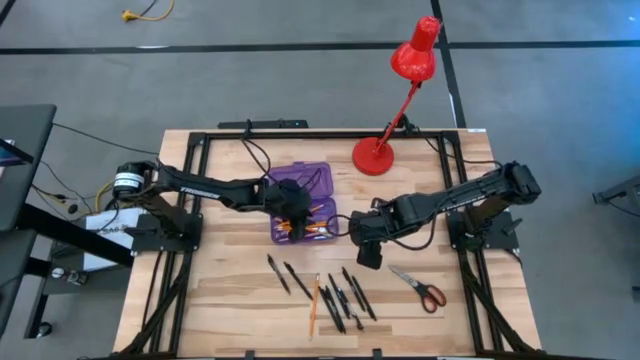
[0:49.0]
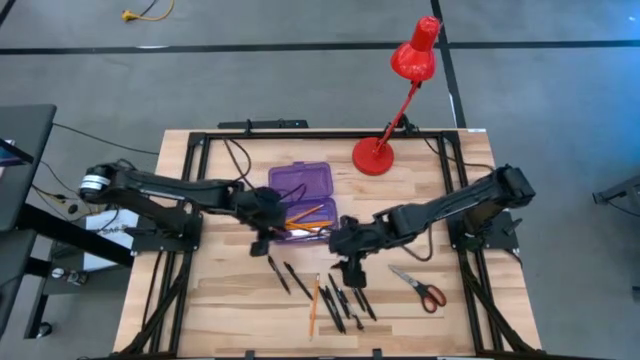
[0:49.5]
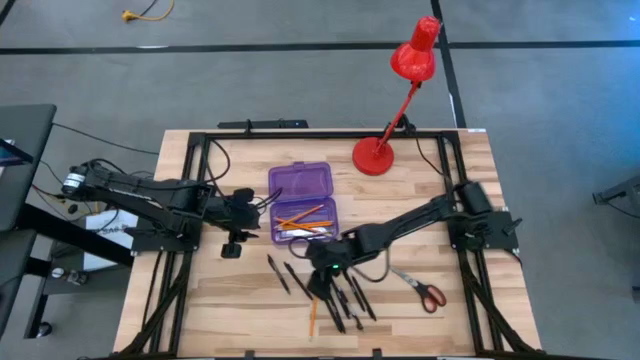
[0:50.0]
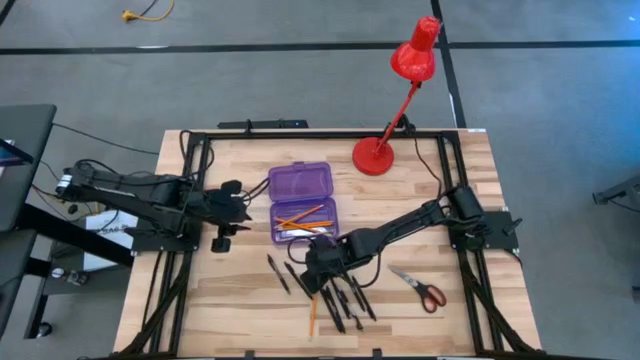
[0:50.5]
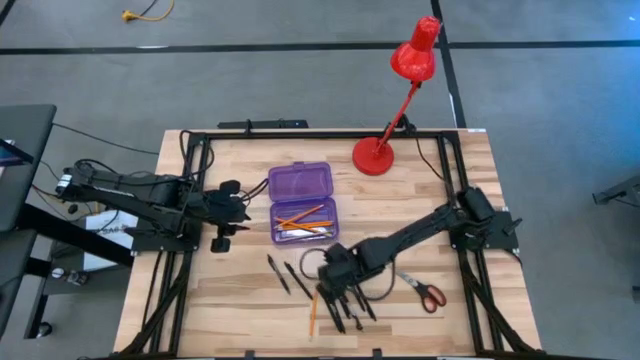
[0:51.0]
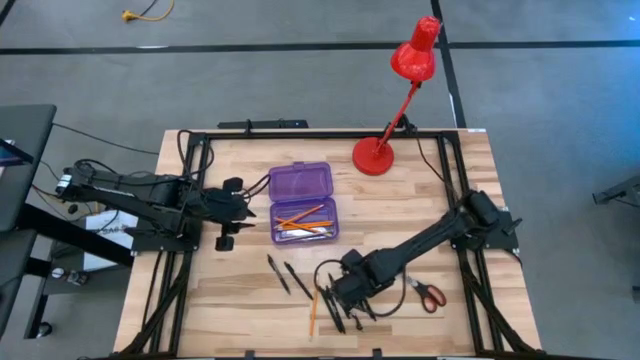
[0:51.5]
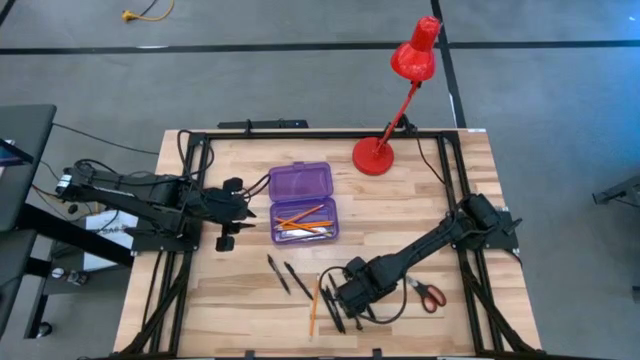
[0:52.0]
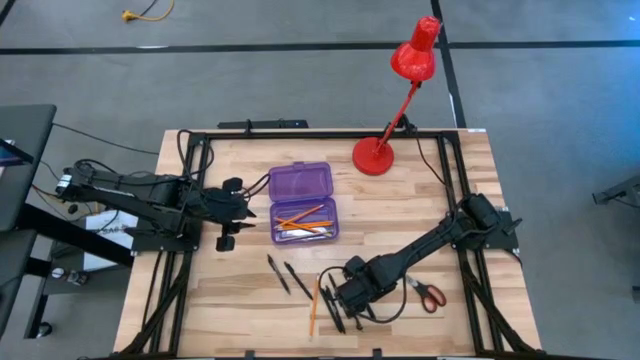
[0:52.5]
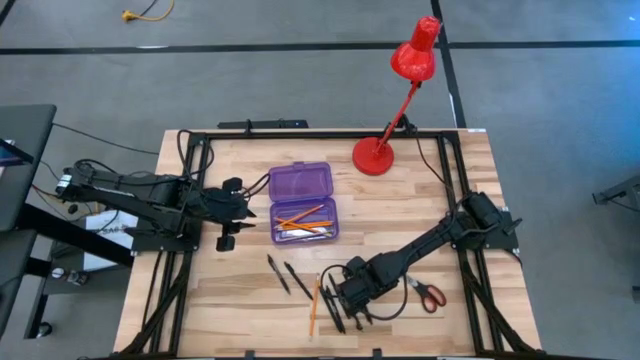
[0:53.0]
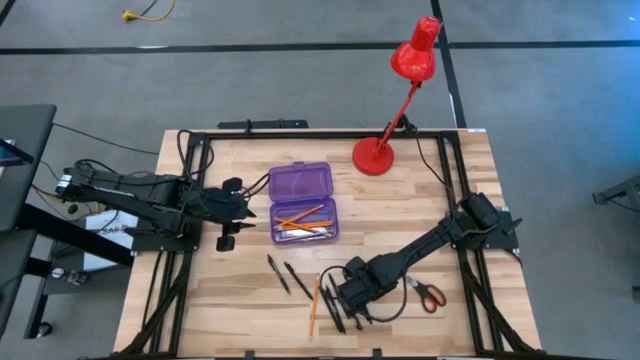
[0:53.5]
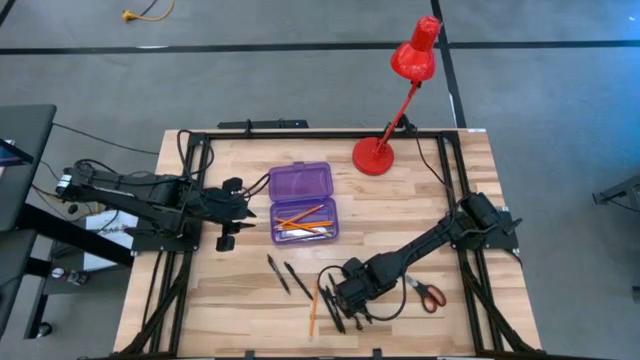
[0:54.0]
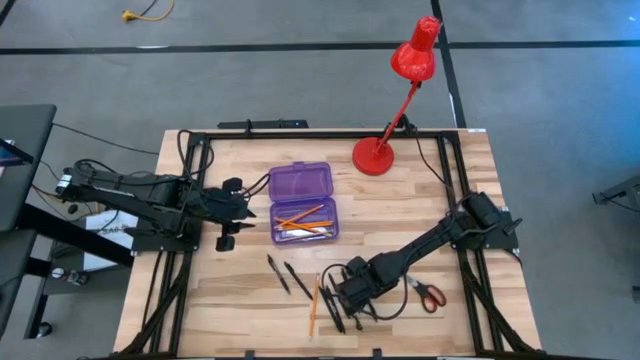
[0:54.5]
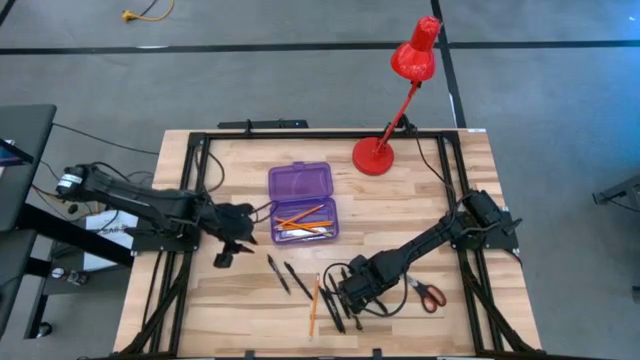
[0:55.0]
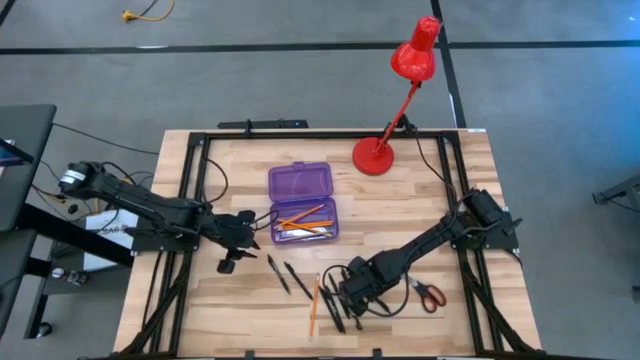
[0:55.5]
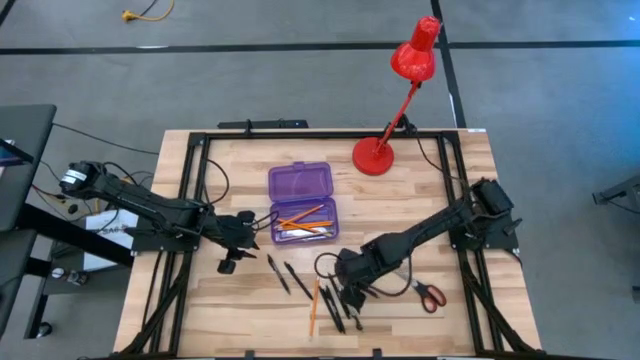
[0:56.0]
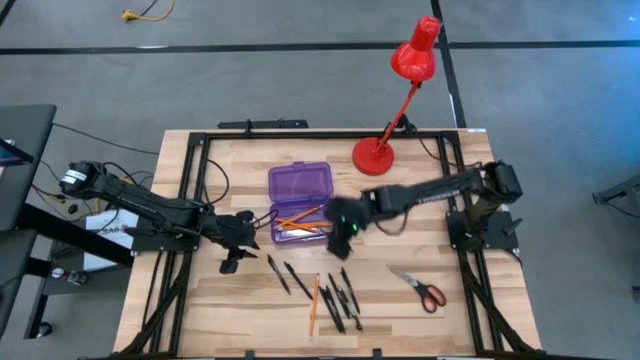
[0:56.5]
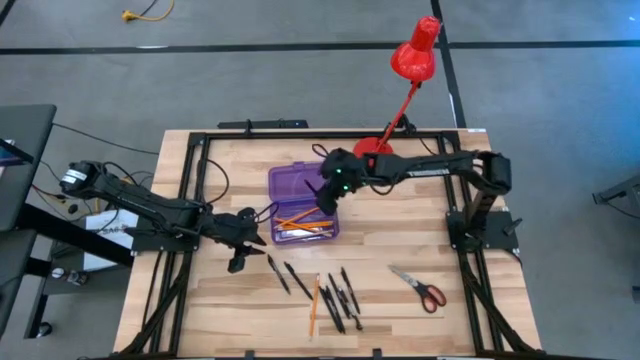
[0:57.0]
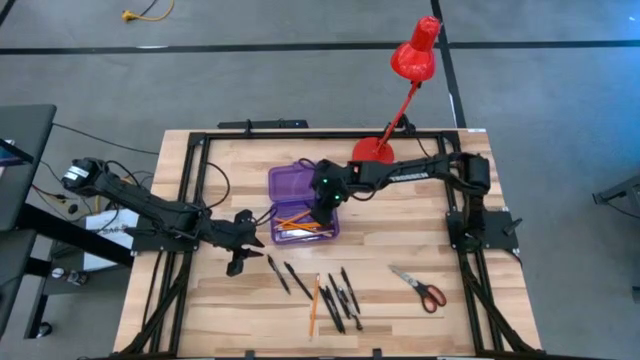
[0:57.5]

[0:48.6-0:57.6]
Task: Pick & place school supplies into a supply box
Put the black pen into the purple supply box

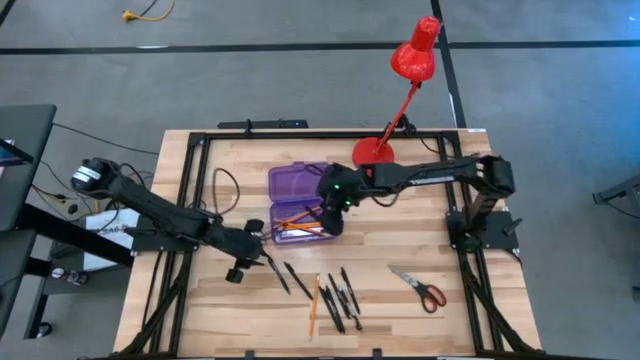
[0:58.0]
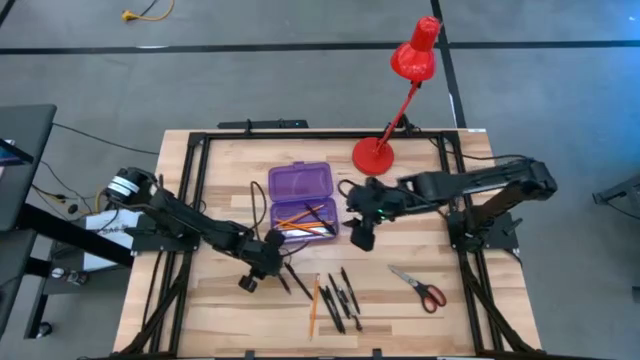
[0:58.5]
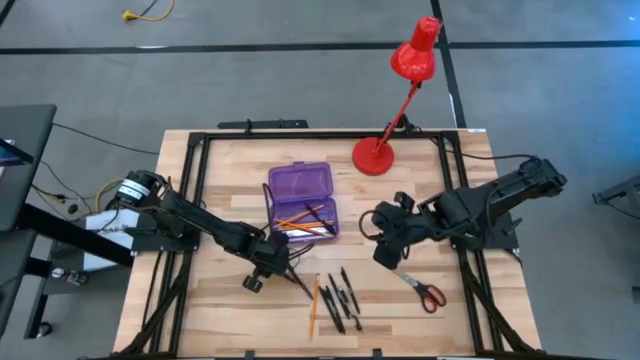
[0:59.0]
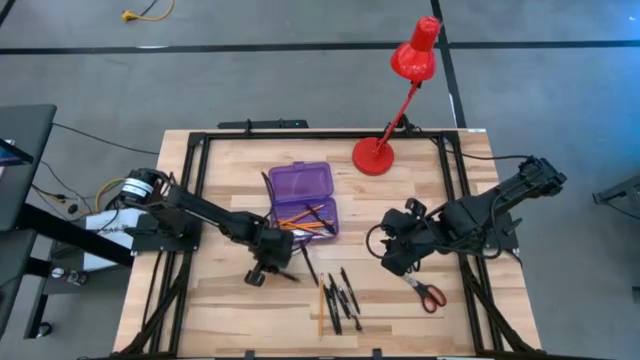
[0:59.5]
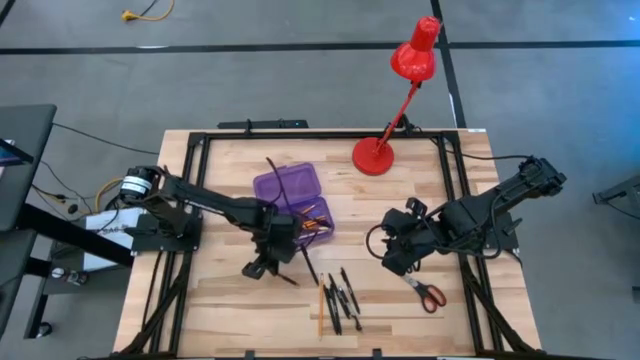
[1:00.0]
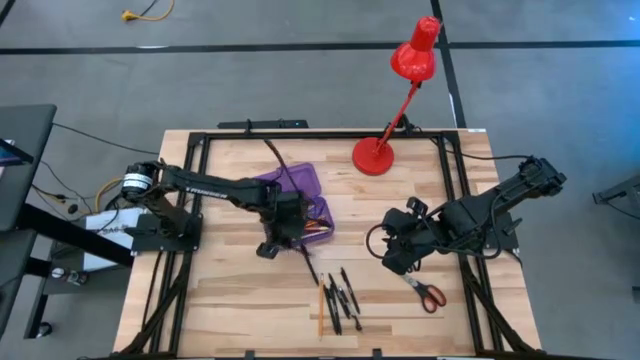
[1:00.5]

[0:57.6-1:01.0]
Put the transparent pen into the purple supply box

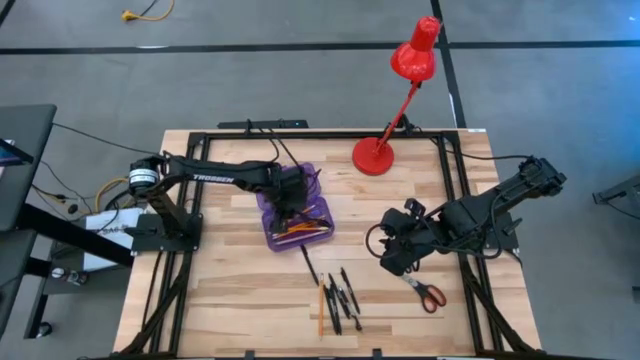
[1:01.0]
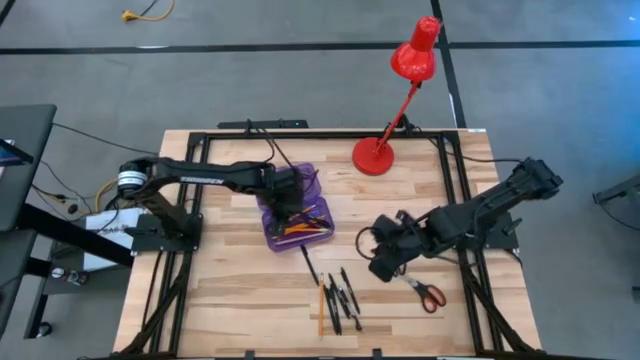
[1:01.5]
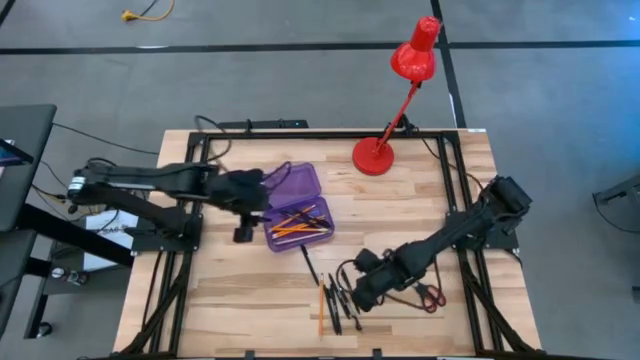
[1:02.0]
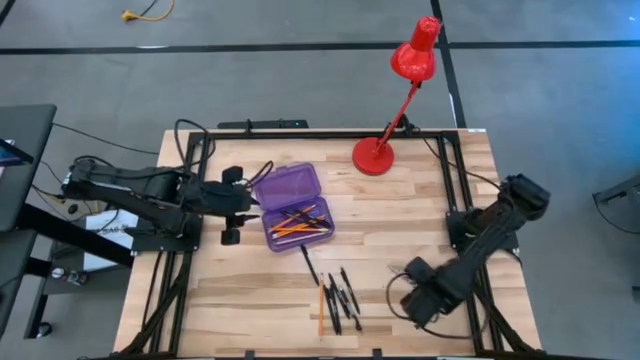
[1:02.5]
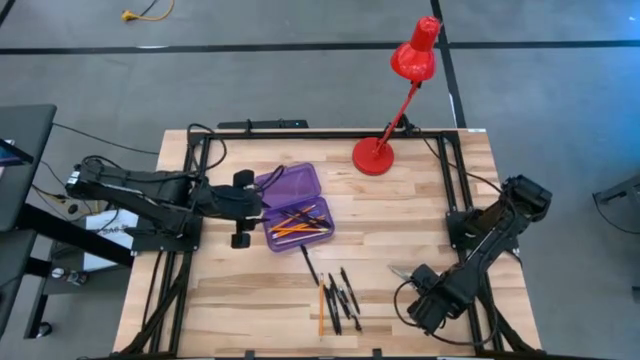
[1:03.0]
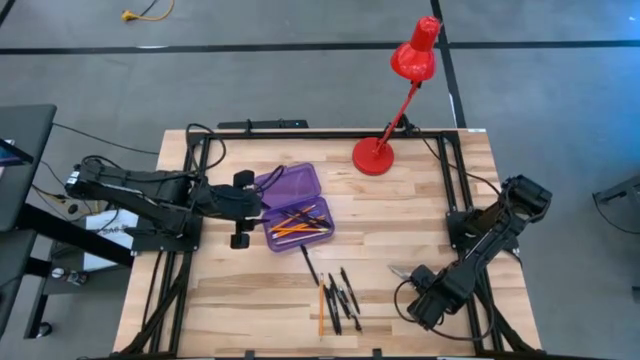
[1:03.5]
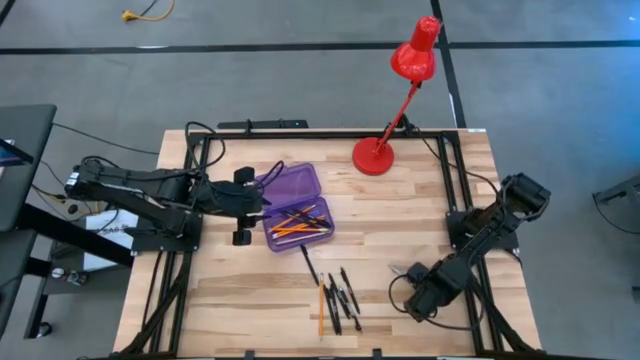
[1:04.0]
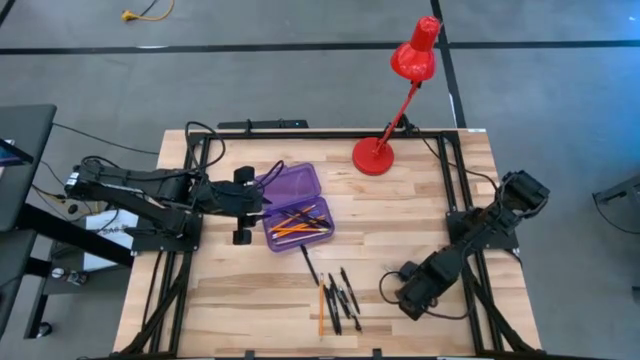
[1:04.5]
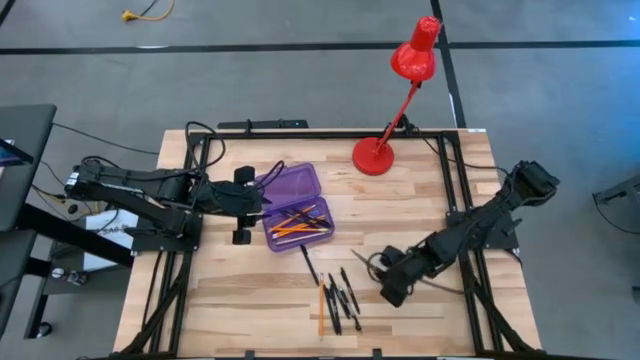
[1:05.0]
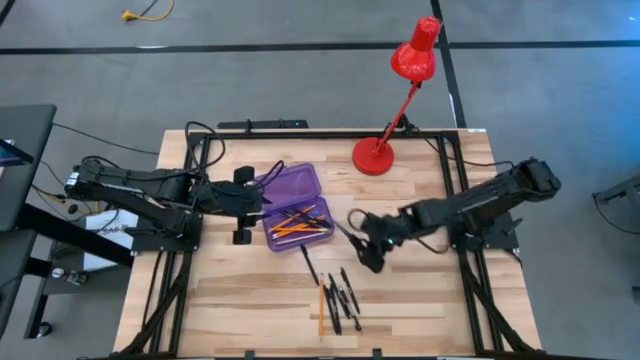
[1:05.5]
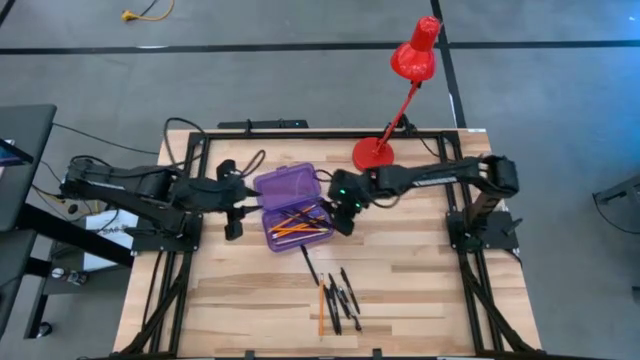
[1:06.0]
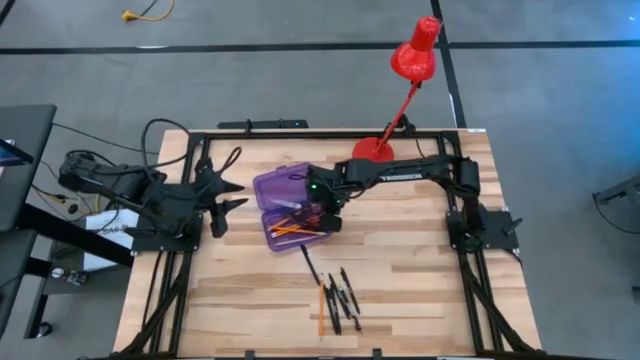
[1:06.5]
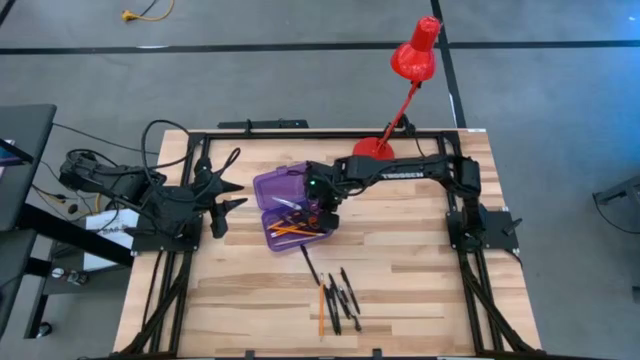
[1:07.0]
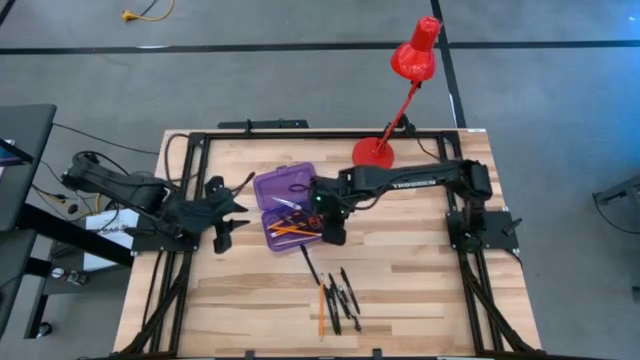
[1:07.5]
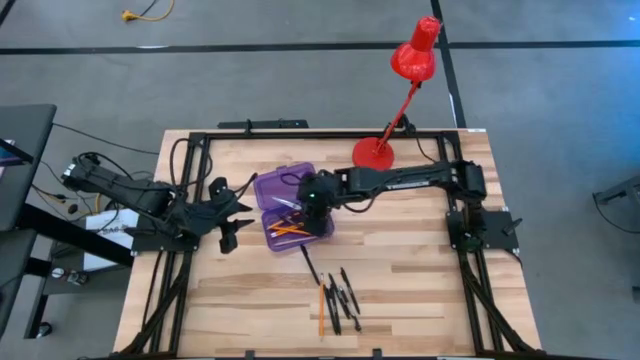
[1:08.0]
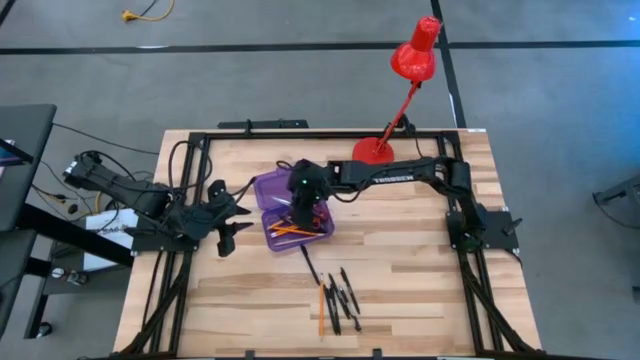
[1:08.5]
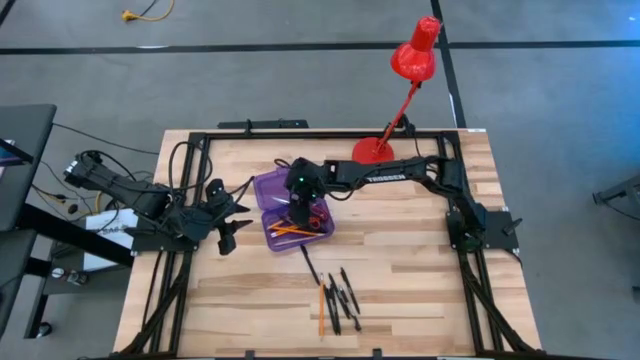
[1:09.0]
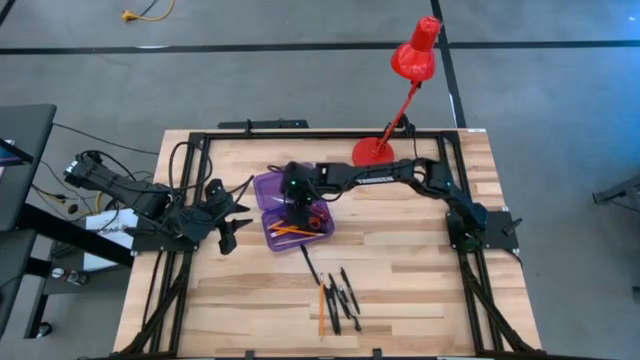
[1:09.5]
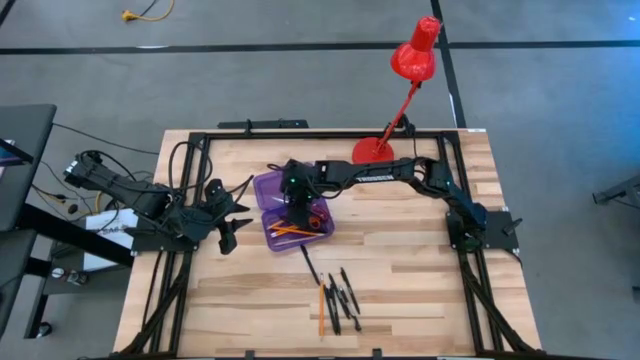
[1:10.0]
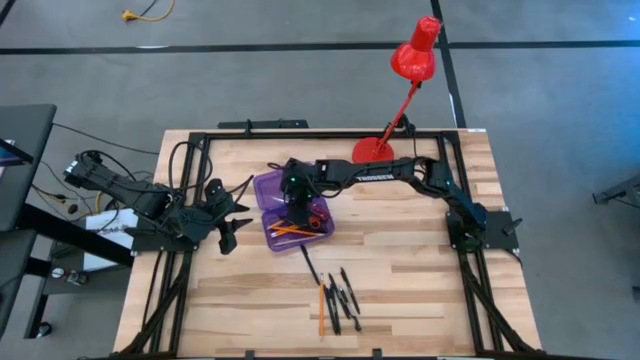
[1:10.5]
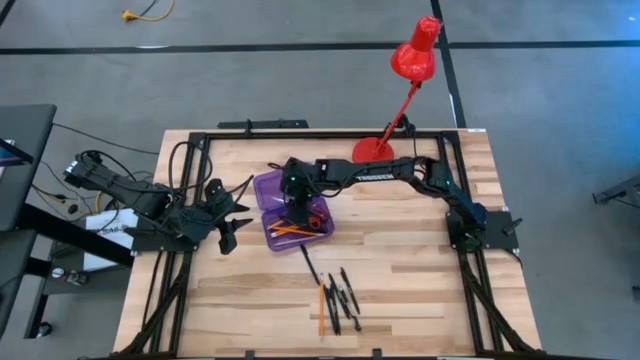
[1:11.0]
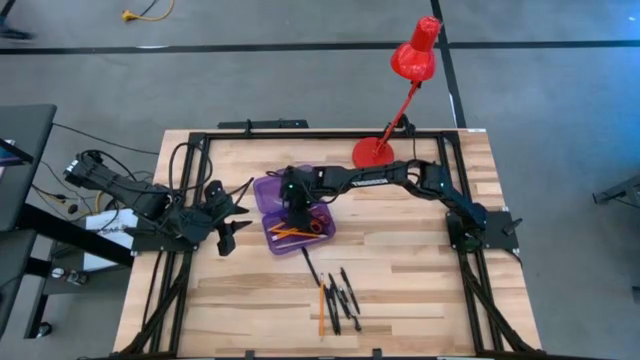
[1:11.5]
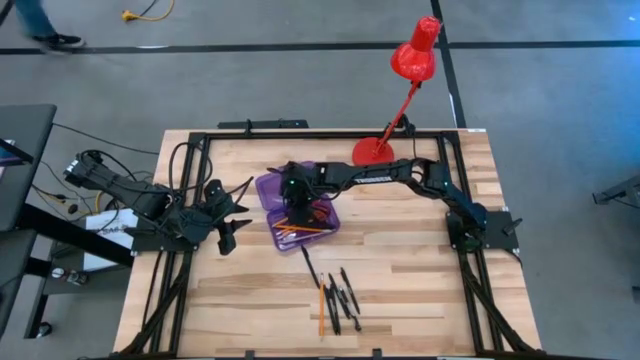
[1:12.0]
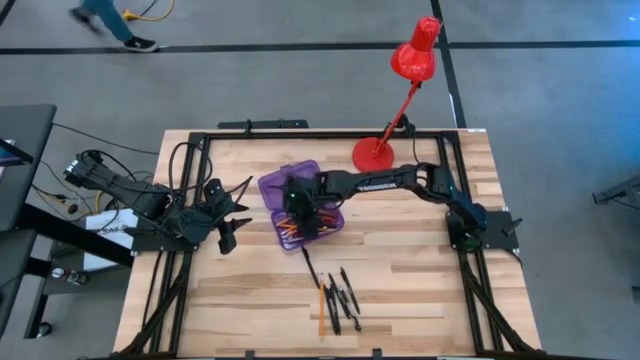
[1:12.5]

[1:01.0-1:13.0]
Put the black scissors into the purple supply box
